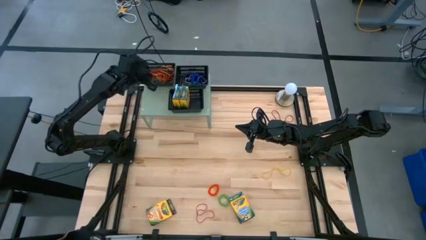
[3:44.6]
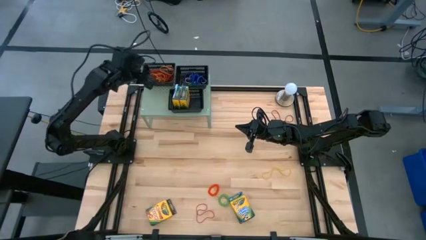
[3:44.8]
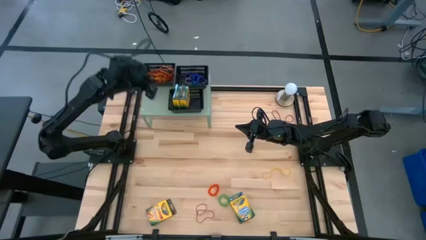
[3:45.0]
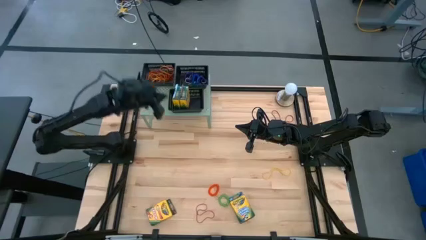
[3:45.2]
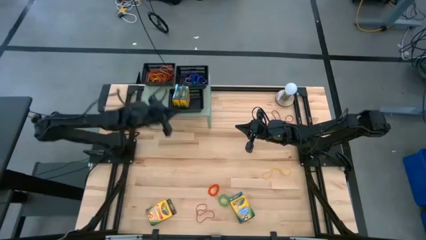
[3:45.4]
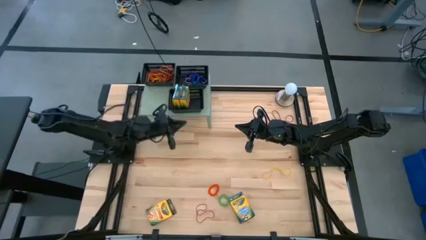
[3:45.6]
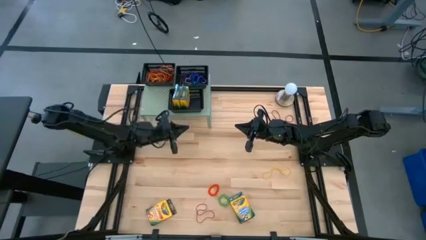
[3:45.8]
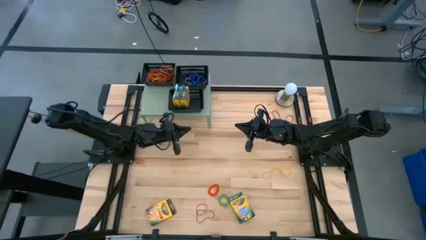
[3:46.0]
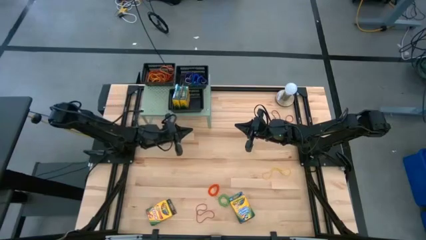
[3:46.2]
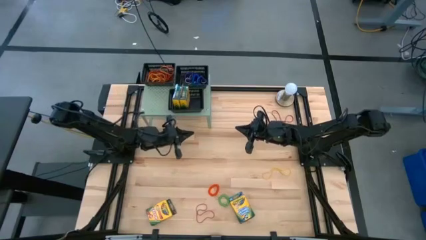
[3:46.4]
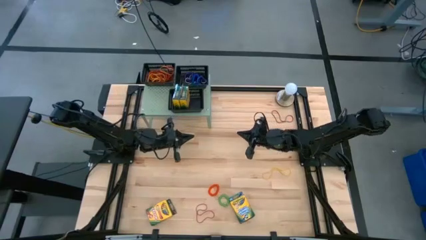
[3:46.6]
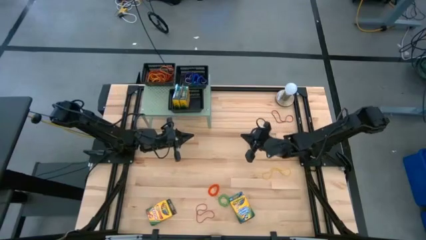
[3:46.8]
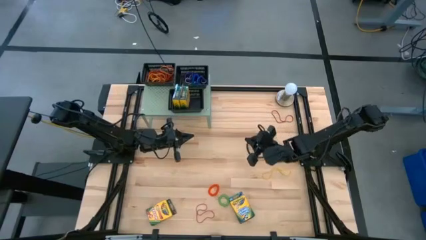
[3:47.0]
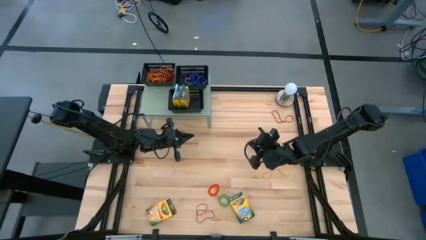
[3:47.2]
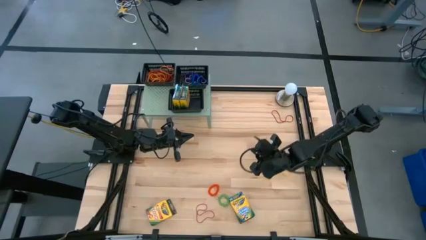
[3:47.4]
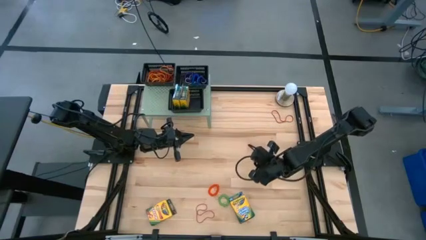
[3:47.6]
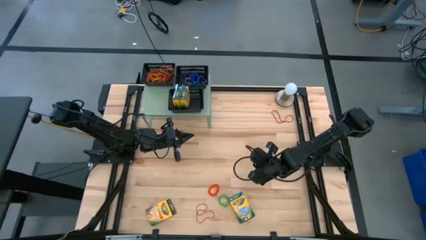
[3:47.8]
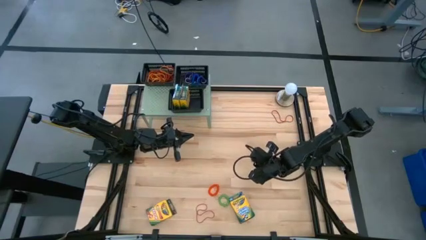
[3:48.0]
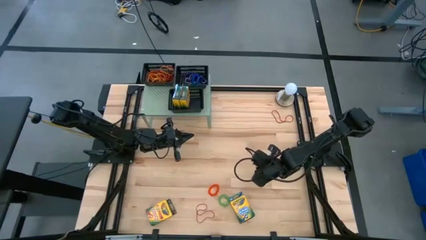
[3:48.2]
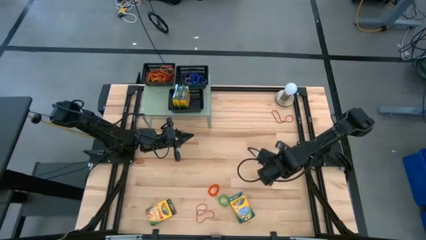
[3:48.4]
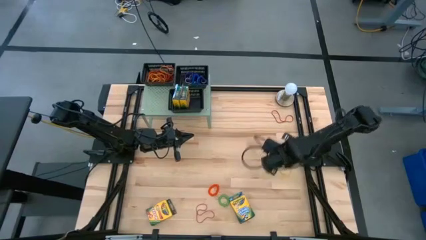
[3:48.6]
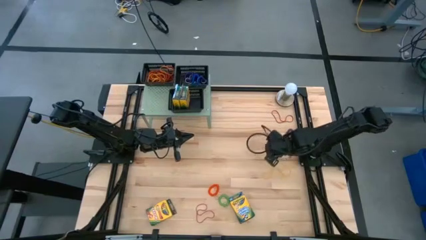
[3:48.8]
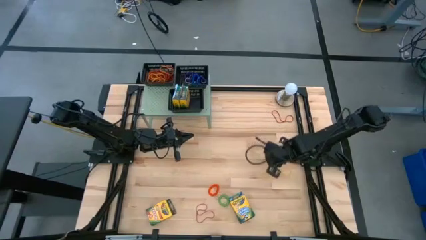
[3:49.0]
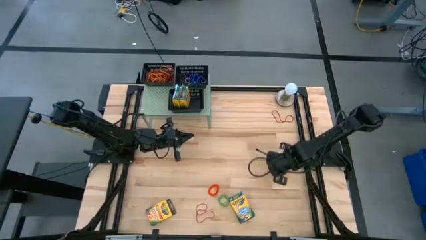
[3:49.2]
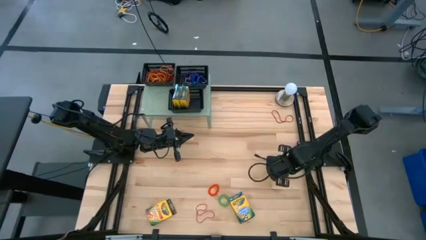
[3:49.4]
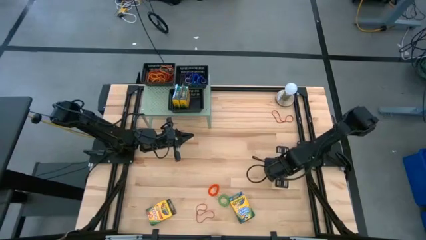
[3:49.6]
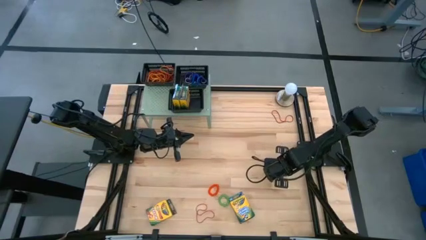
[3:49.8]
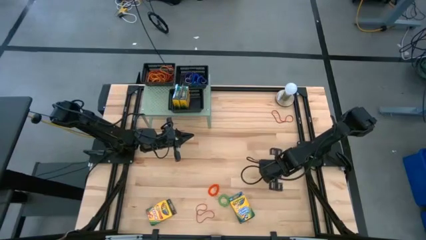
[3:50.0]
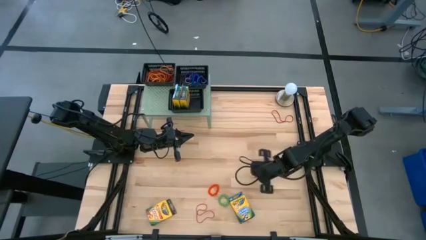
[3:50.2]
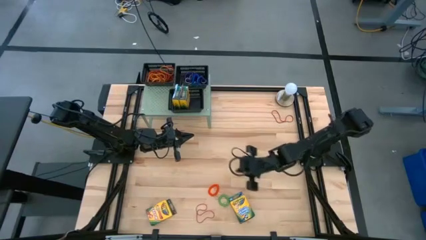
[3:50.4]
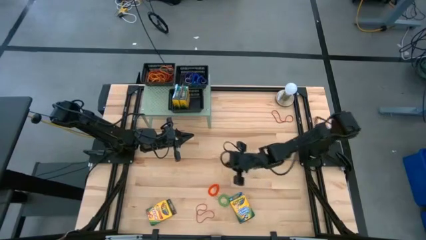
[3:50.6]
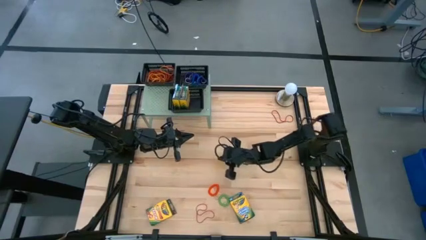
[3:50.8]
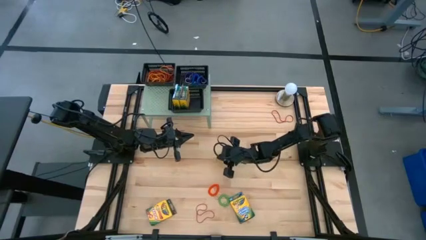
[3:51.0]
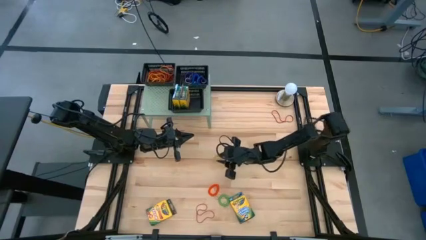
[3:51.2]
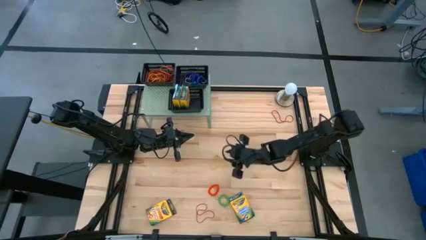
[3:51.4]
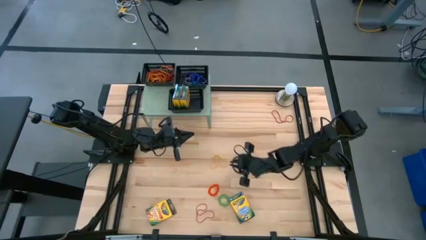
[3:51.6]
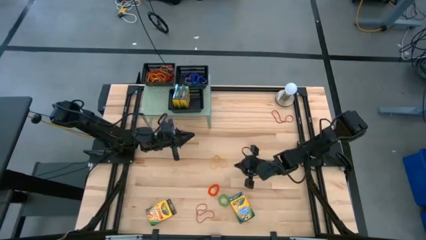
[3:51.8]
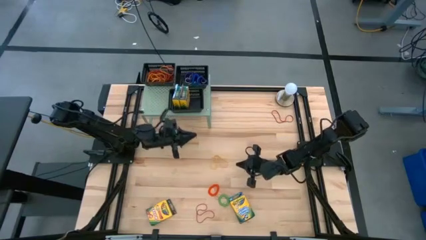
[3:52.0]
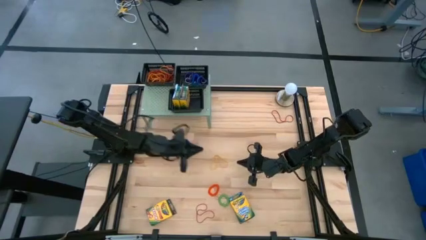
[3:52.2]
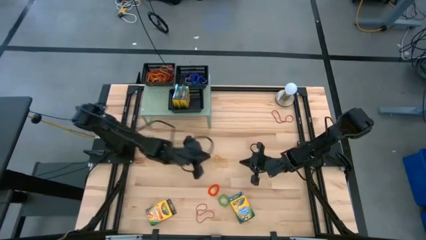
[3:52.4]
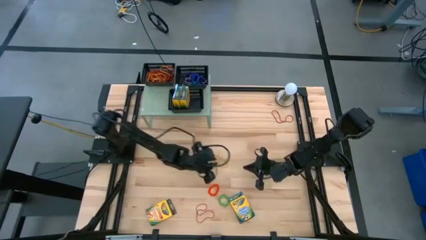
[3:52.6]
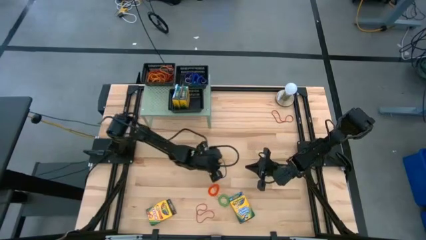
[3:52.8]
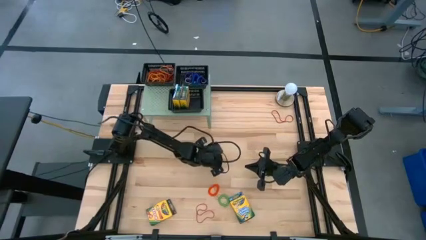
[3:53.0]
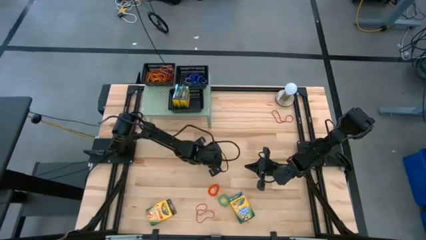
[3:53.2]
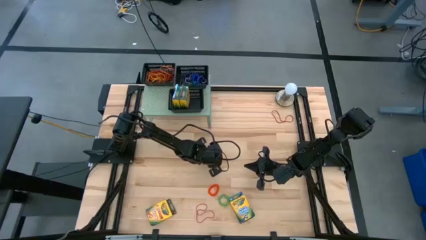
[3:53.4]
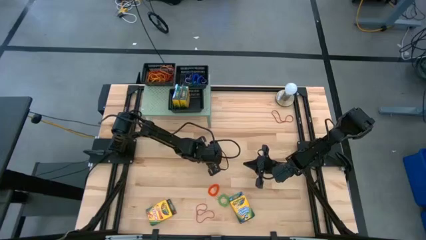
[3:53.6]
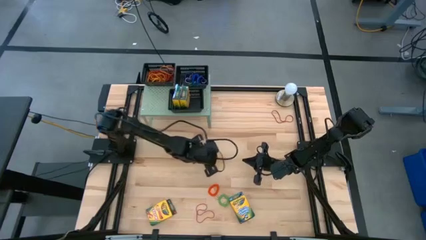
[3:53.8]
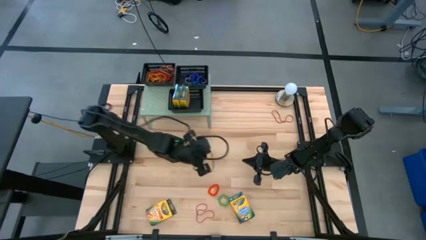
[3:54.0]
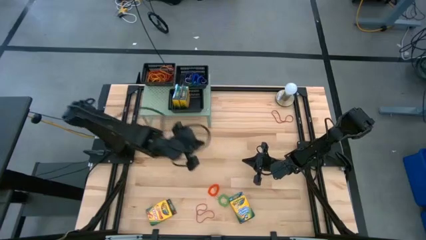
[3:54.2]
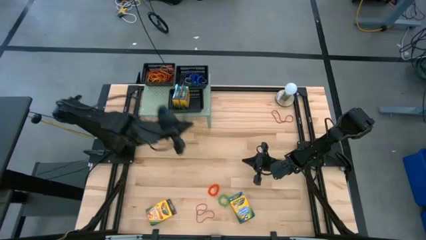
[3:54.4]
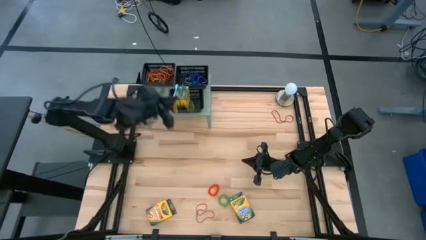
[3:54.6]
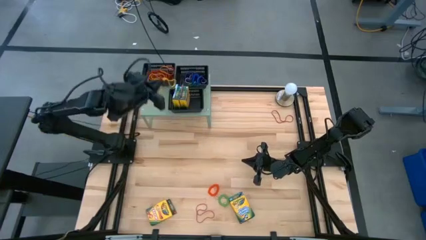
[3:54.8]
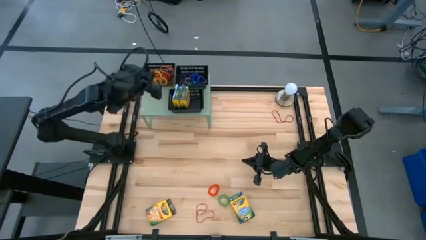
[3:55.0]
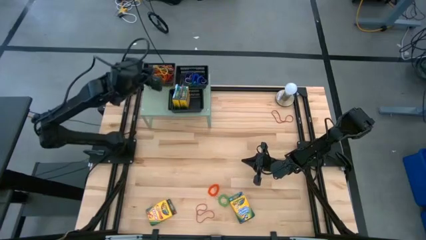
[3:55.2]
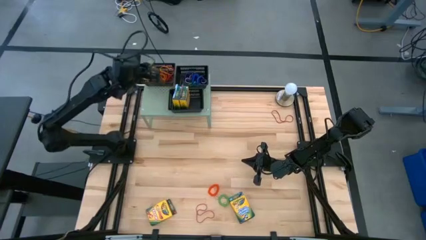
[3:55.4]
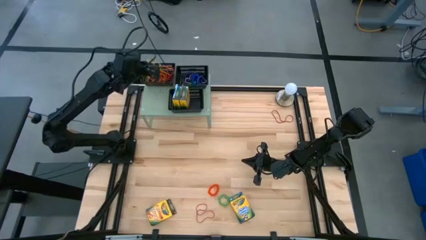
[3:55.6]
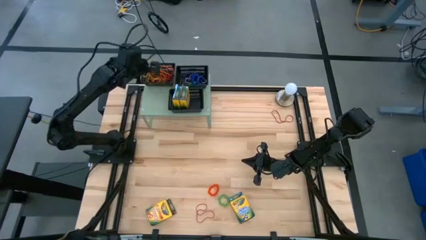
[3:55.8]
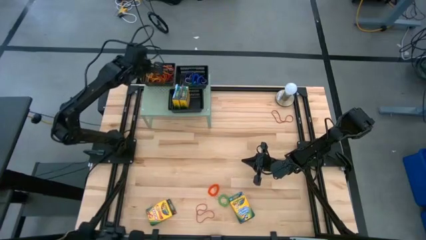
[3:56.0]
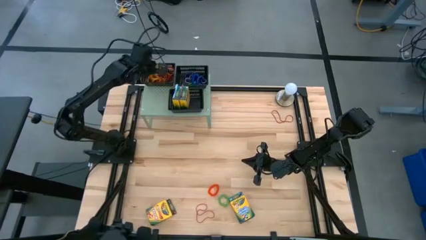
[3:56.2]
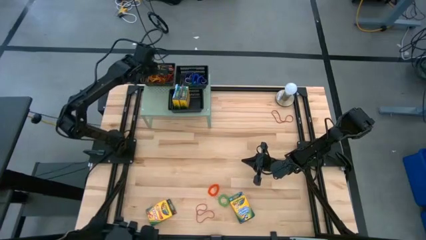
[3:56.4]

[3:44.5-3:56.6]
Task: Pick & Place Office Desk Supplies
Put the yellow rubber band into the top left black bin on the shelf

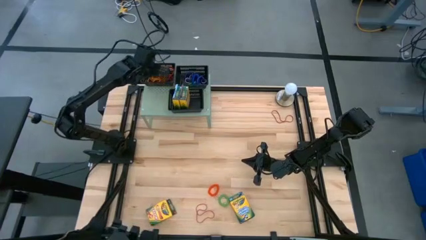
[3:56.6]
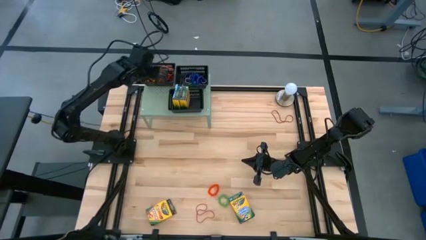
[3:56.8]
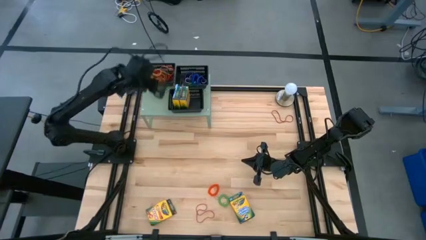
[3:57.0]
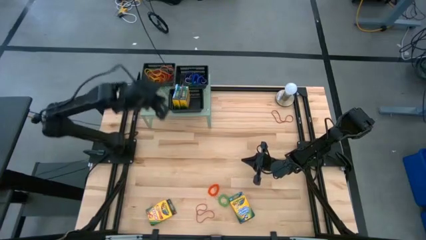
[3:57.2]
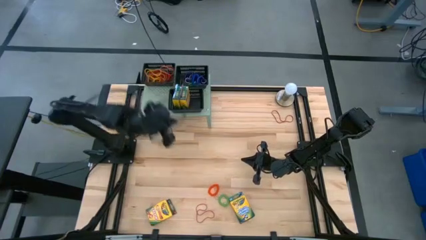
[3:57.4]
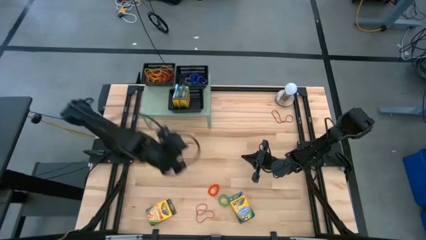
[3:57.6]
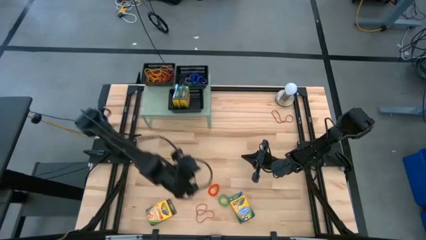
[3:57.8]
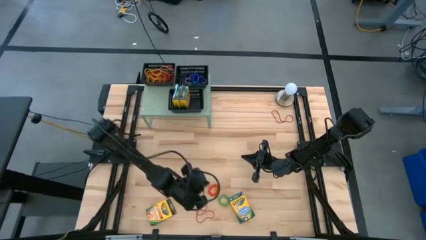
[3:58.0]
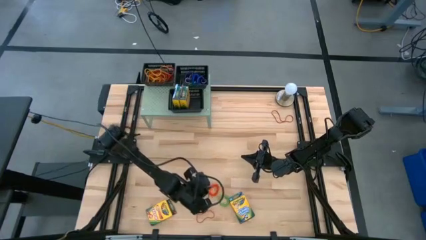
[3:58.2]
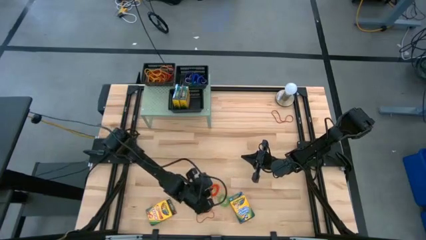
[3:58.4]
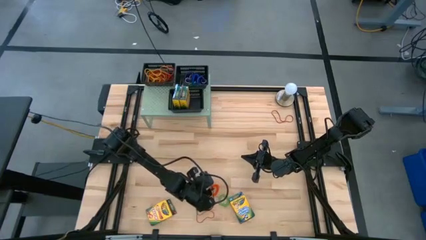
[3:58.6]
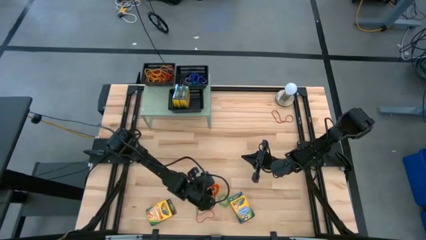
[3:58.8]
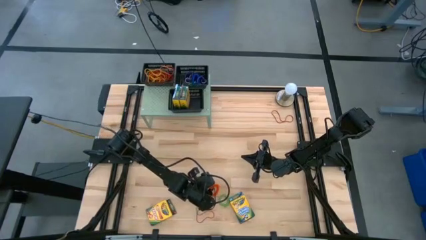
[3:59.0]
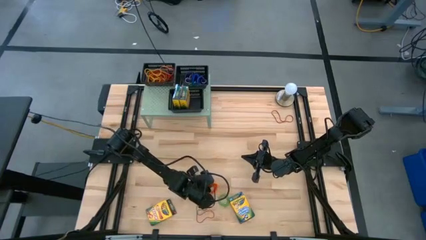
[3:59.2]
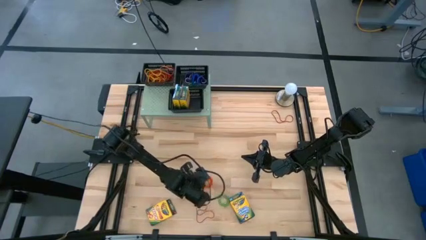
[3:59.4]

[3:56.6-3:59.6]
Put the orange spring keychain into the top right black bin on the shelf

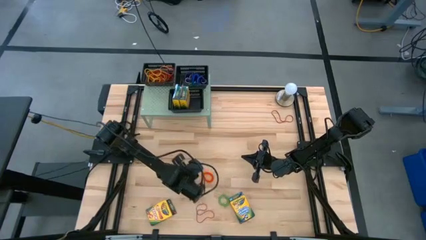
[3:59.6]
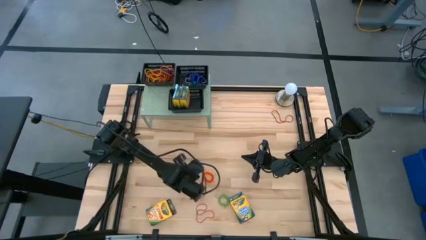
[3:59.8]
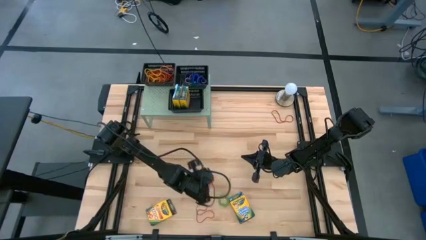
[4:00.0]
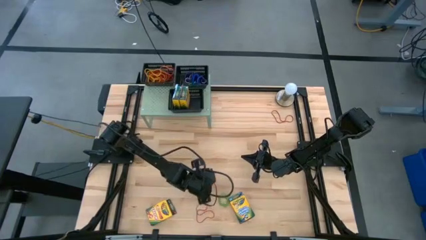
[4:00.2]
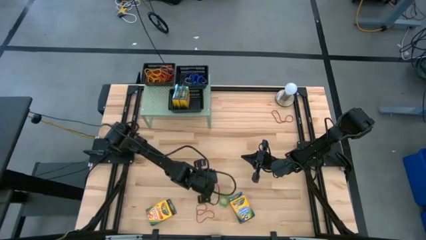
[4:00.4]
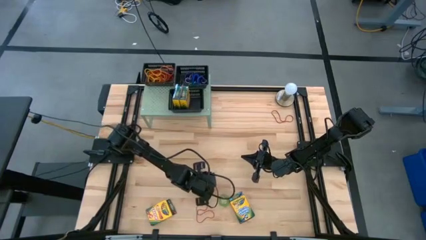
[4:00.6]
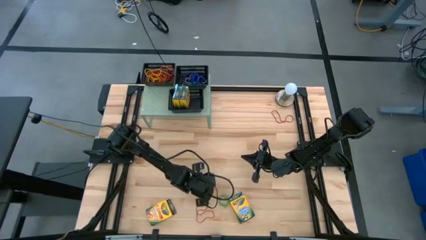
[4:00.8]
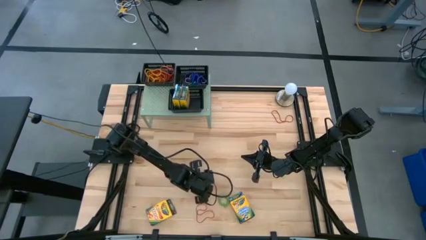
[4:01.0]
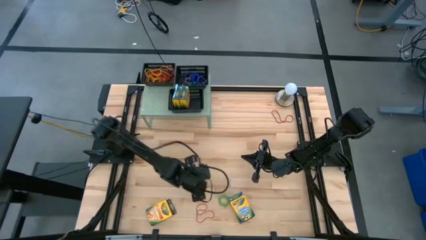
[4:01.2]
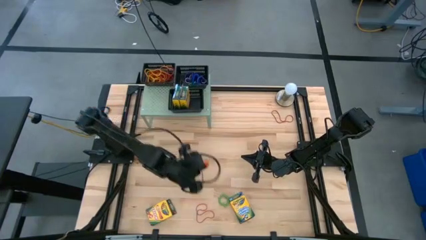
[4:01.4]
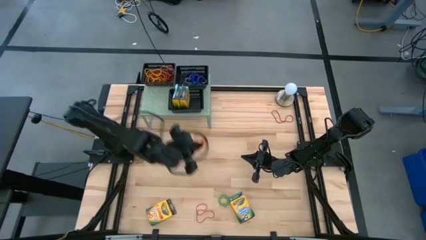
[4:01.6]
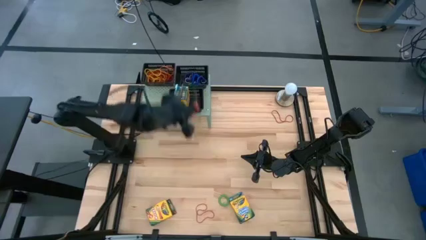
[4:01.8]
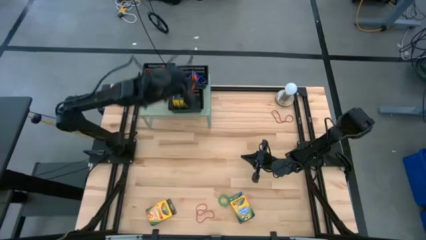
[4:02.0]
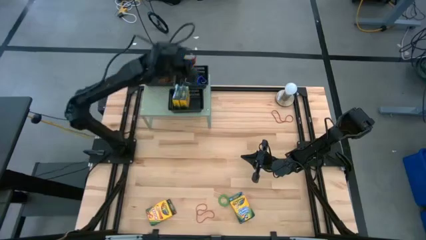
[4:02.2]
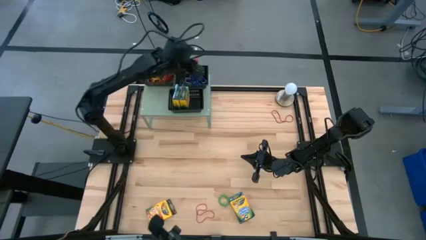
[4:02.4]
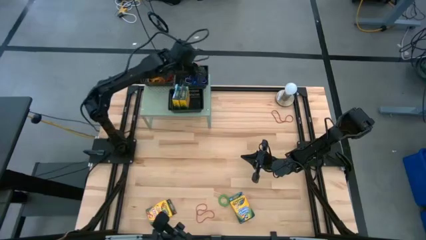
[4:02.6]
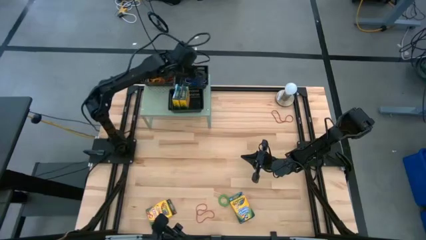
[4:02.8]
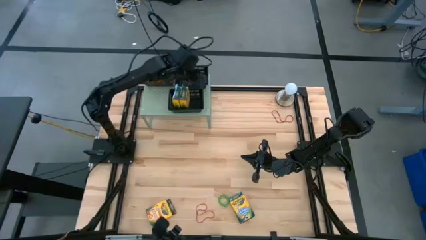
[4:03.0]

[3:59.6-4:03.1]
Put the orange spring keychain into the top right black bin on the shelf
